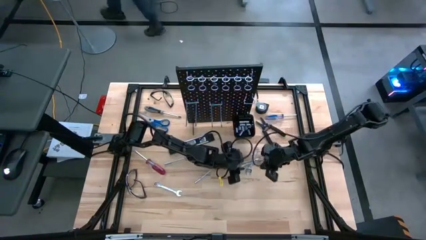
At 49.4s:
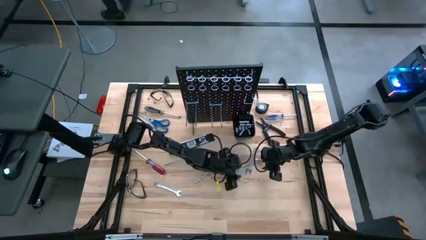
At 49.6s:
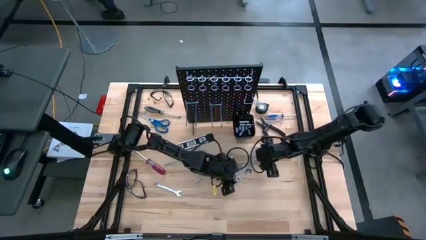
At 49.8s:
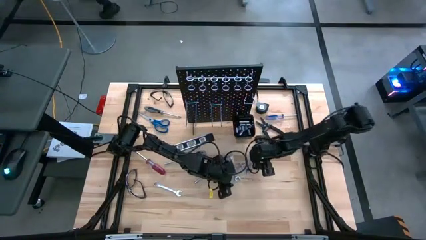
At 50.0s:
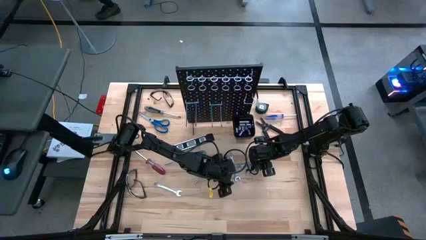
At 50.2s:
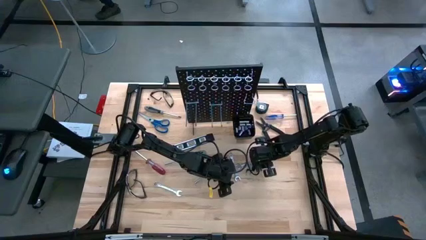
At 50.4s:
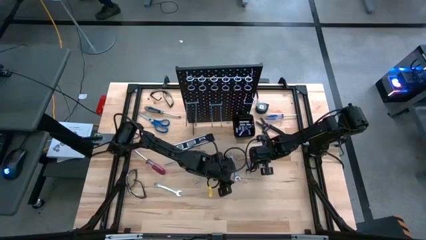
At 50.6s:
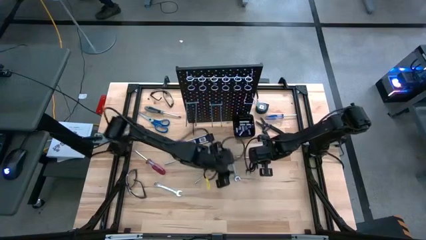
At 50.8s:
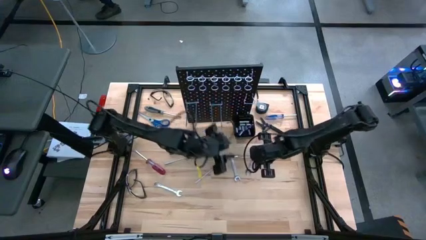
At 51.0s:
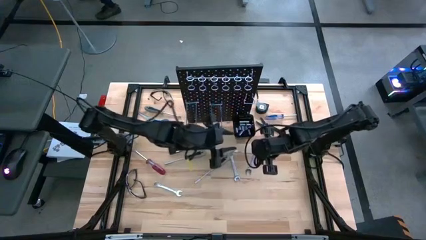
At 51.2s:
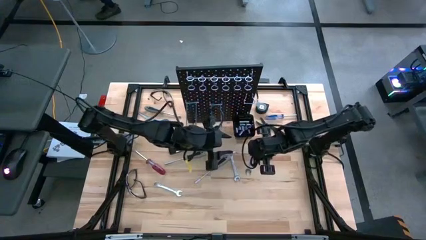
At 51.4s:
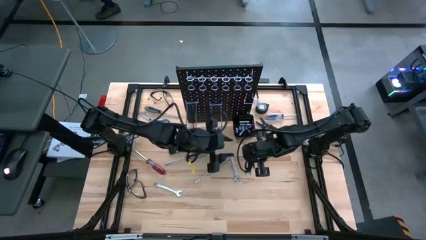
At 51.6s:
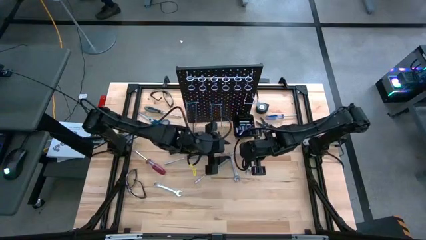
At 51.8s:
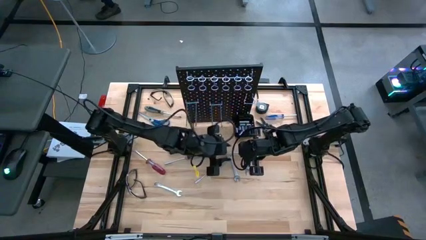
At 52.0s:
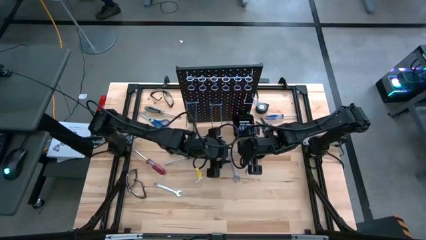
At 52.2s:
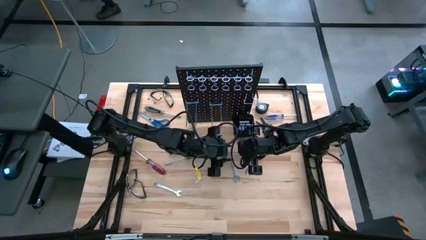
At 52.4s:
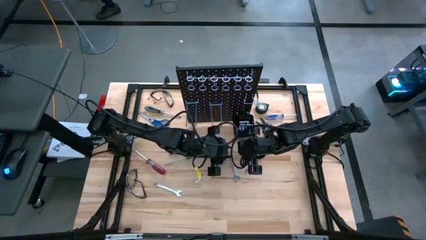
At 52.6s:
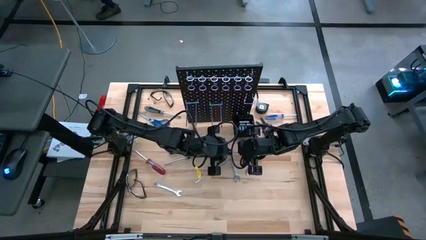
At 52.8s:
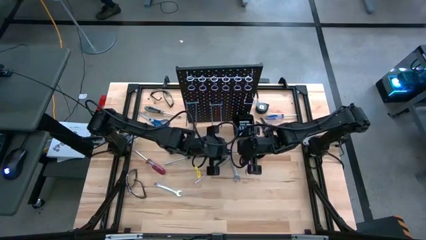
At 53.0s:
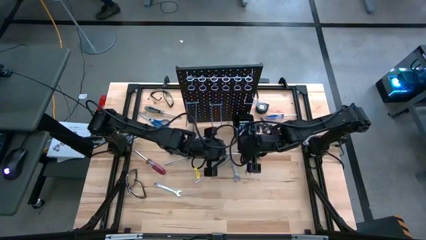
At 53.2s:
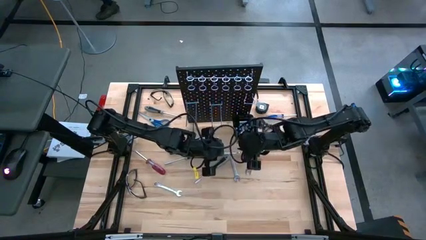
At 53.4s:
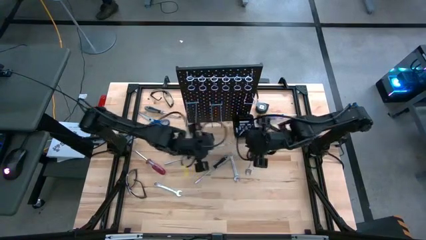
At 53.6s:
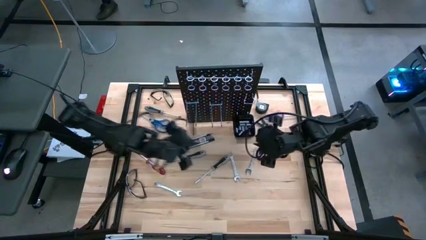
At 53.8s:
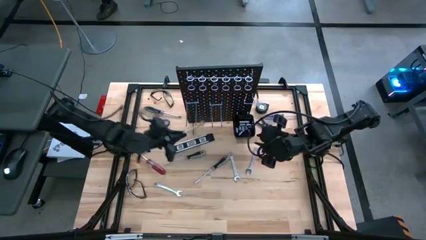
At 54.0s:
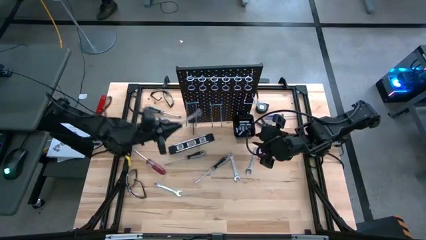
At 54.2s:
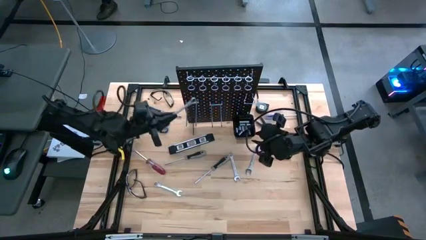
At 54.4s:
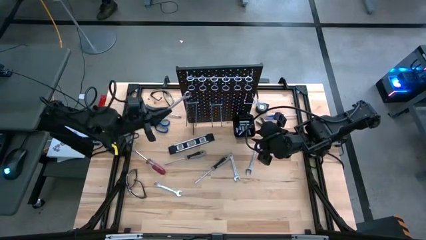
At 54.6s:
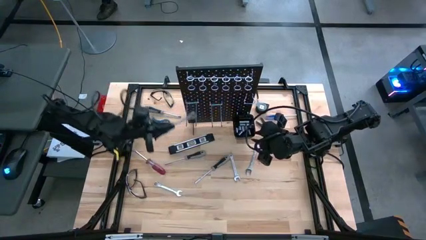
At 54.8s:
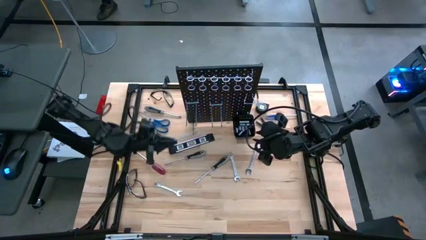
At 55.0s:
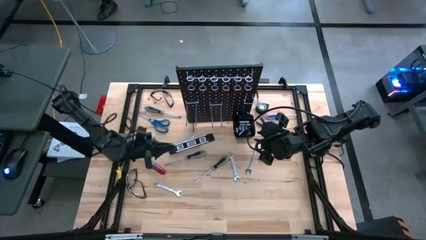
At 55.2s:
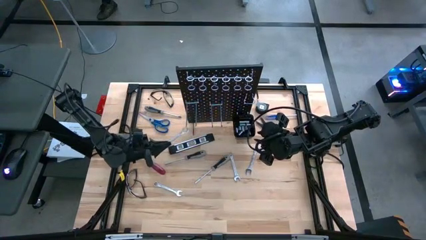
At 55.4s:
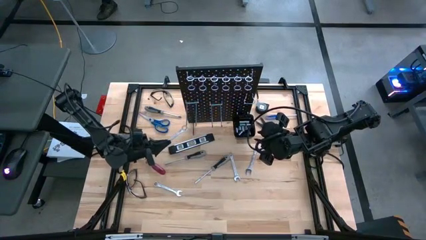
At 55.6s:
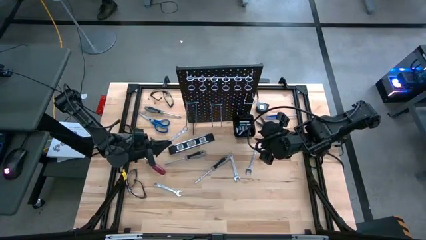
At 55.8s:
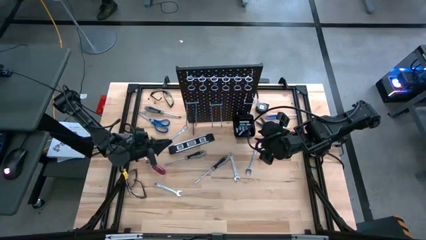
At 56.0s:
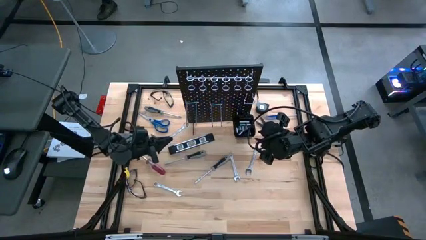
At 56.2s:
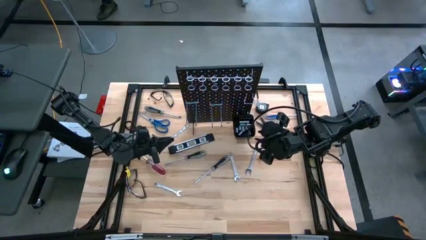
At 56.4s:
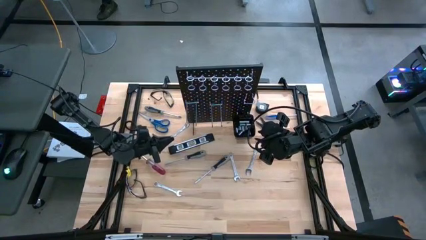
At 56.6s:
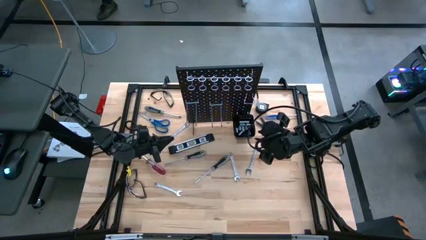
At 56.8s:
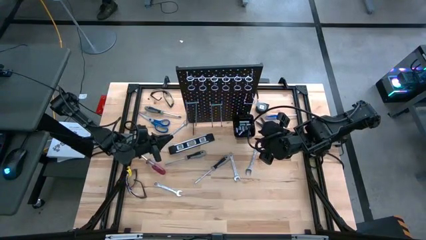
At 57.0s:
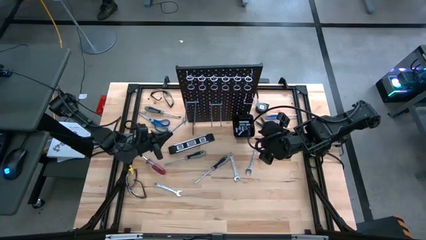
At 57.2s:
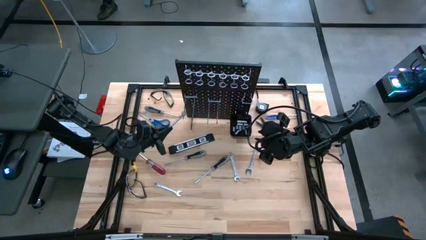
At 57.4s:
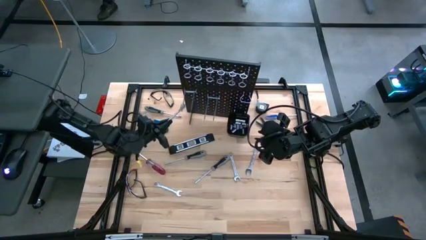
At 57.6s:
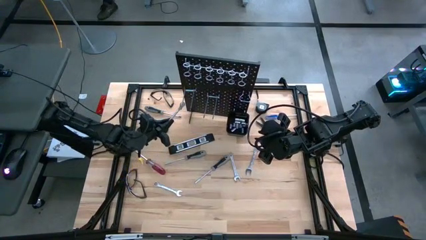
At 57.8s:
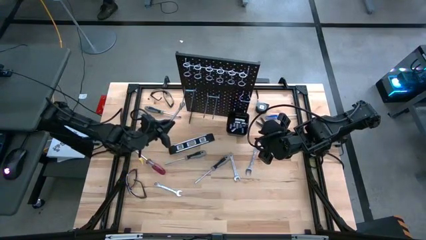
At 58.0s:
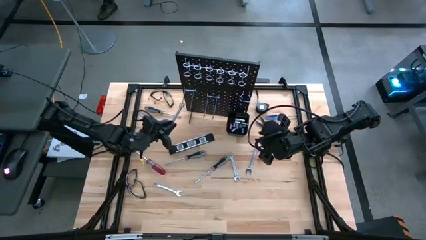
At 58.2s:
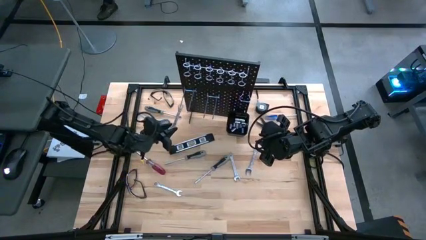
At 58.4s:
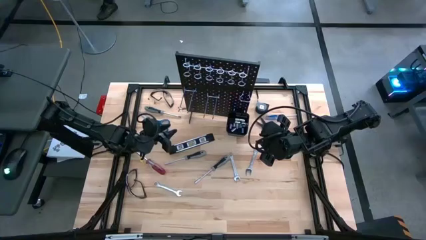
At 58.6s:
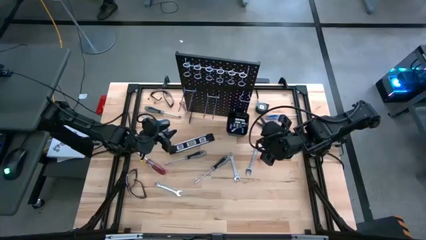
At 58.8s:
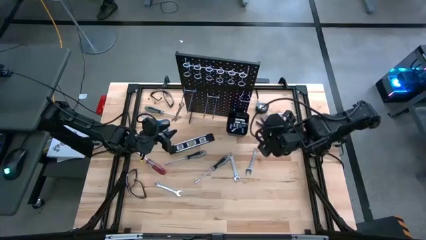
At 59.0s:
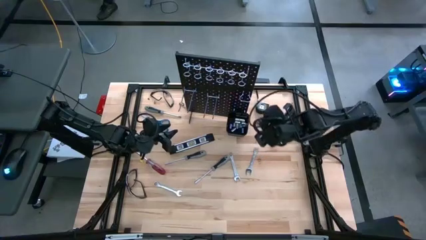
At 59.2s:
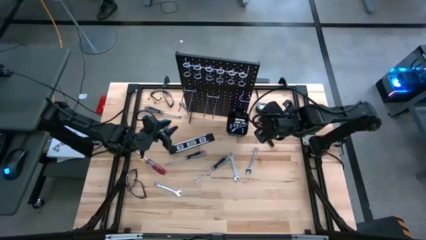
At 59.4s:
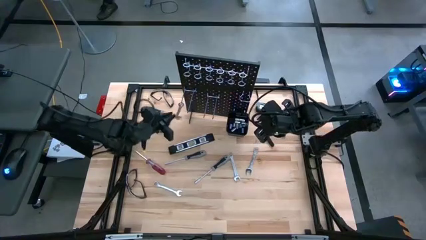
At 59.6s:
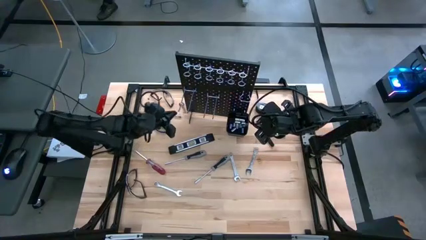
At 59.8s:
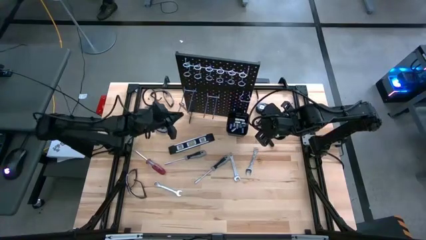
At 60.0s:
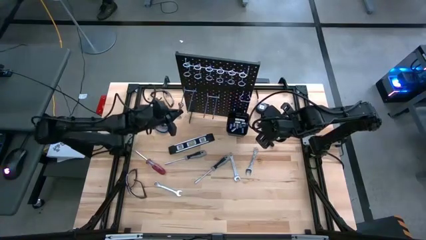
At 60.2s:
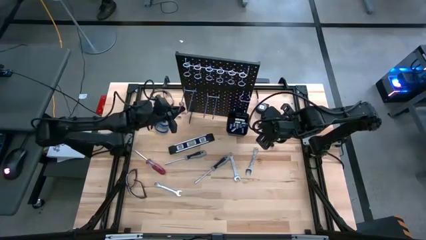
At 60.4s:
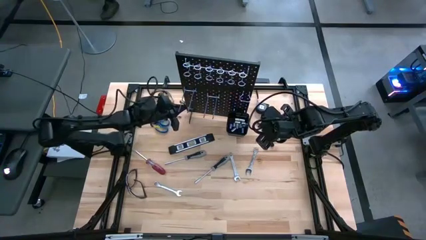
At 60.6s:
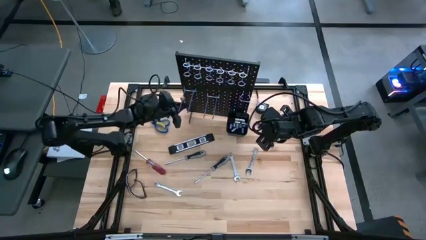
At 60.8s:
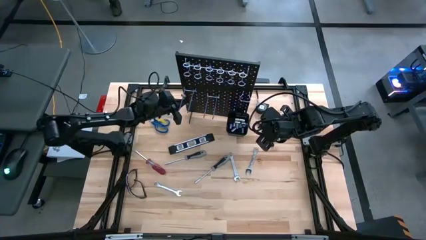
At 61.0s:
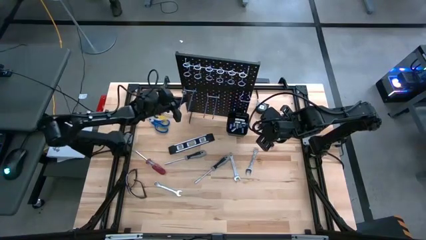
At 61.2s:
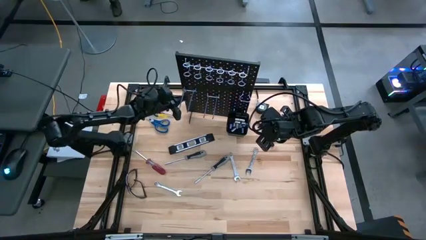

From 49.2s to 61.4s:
Task: Hang tools onto peg board
Hang the silver wrench on the pegboard

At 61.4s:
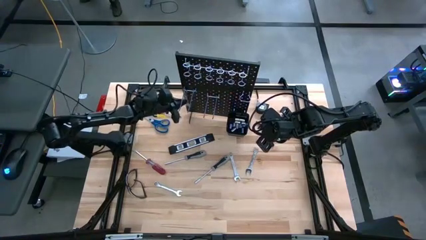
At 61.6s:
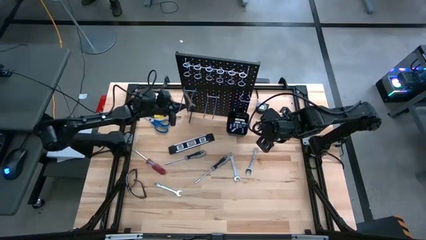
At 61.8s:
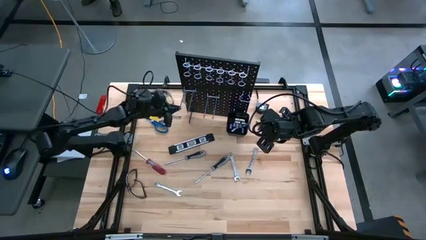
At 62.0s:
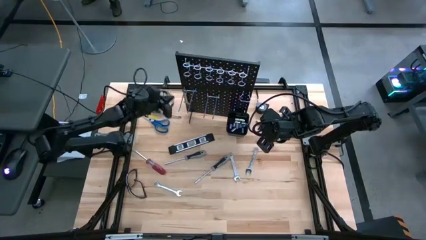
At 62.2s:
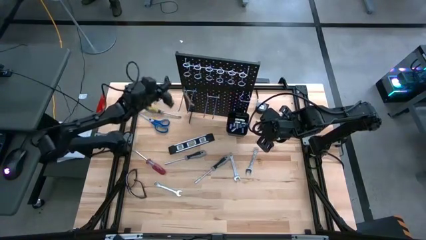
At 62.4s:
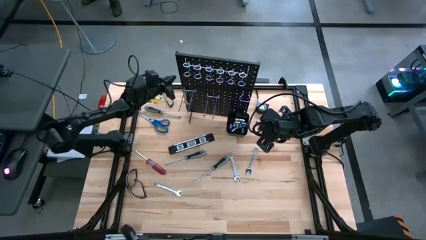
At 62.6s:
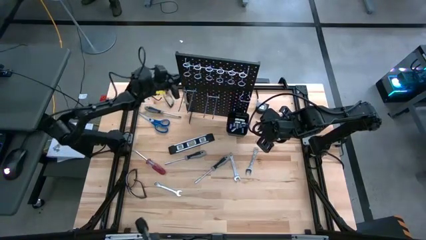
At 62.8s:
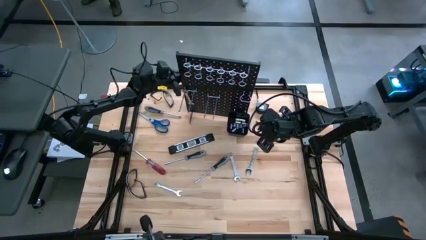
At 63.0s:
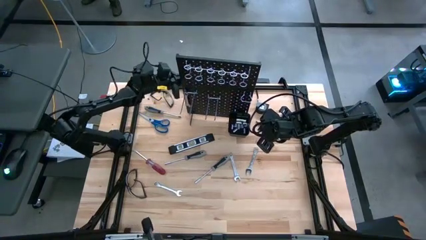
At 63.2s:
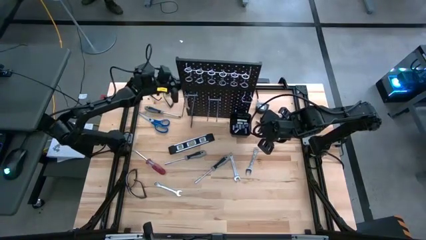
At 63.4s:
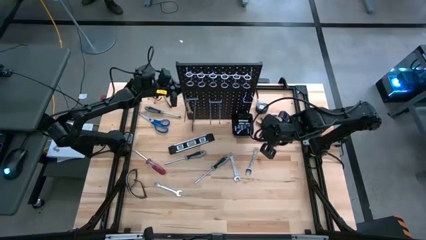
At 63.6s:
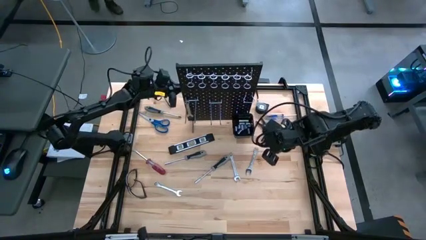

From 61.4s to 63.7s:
Adjust the pegboard

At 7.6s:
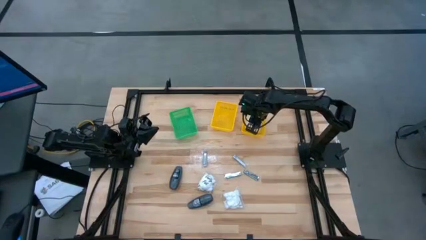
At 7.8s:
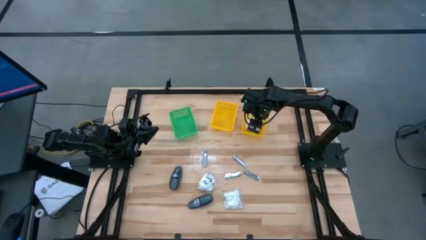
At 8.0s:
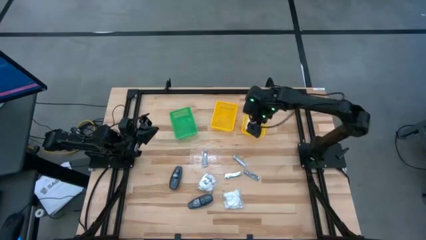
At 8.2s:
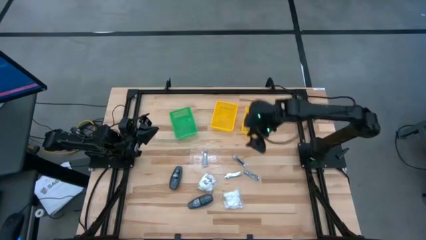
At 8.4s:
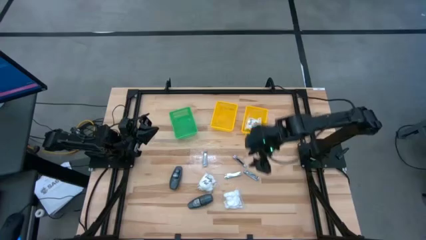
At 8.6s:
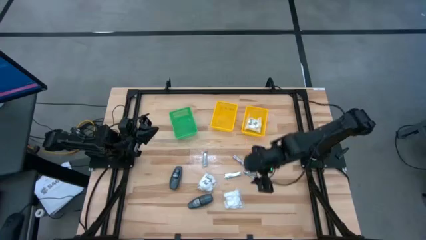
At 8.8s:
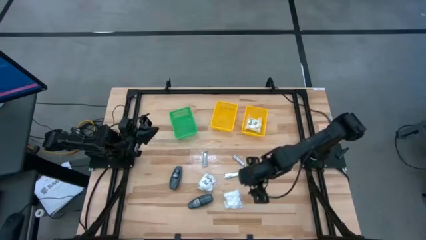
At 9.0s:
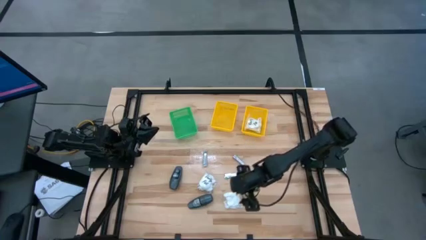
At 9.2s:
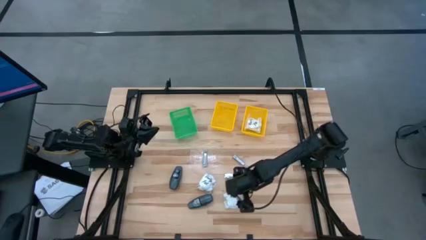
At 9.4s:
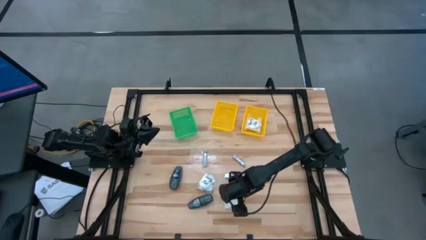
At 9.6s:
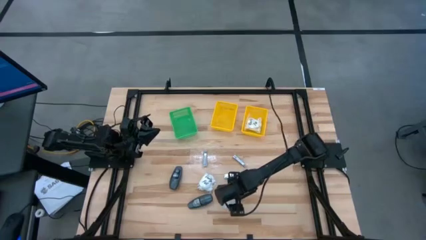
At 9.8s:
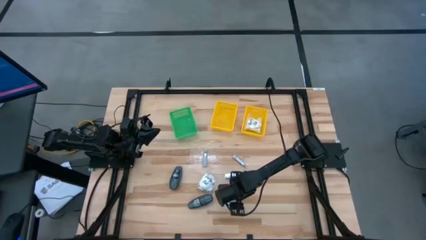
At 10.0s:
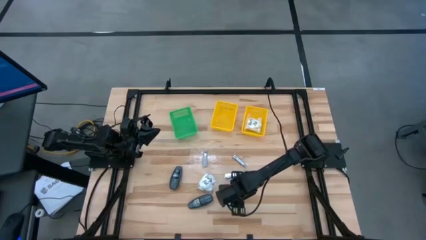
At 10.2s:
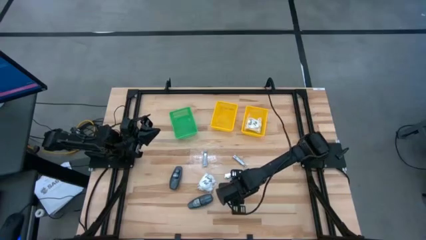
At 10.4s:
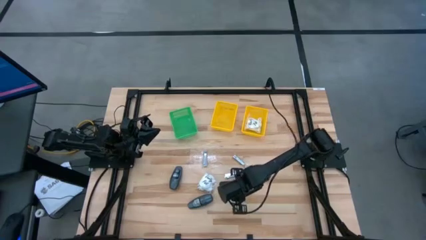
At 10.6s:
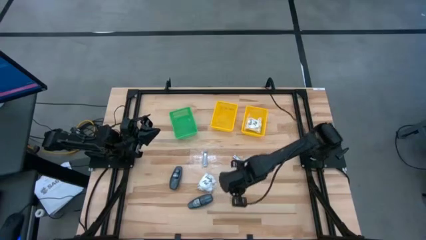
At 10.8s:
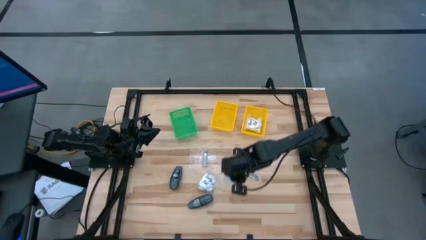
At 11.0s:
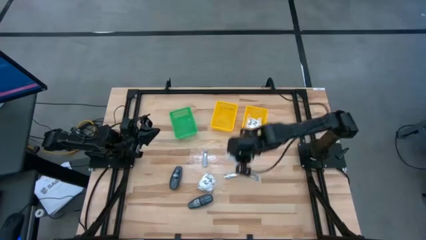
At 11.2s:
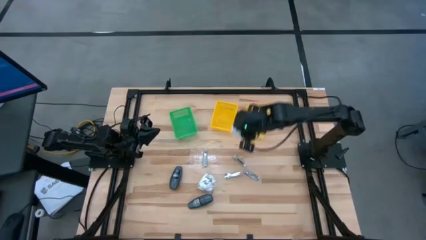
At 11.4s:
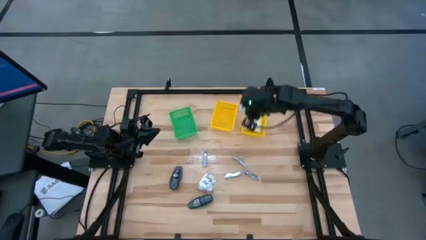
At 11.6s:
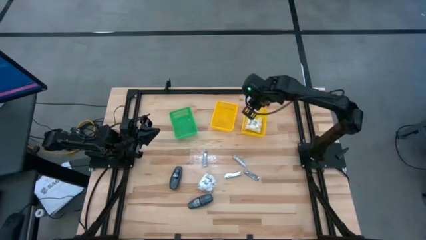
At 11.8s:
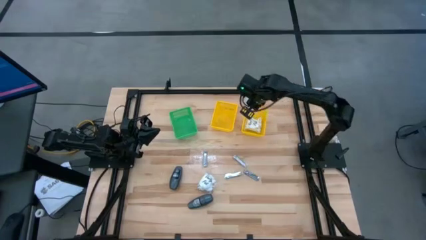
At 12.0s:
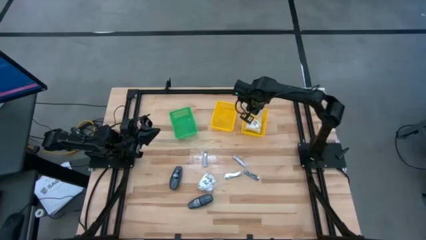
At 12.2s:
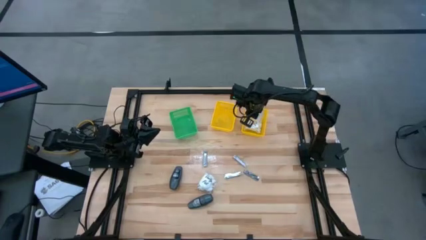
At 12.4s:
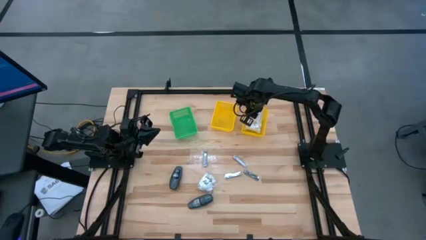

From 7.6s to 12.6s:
Task: Pick & Place Travel size toiletries
Put the white cotton pack into the right yellow bin
